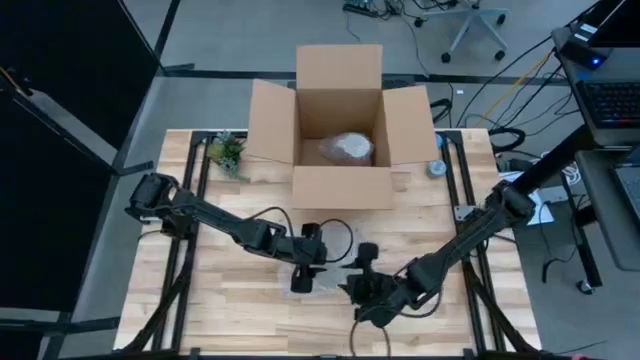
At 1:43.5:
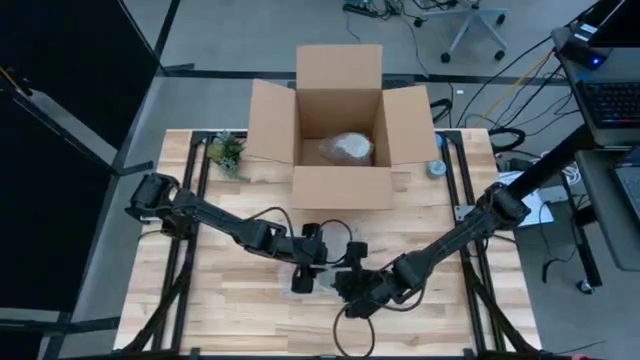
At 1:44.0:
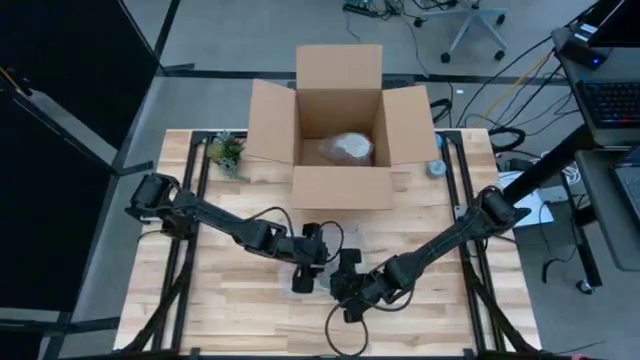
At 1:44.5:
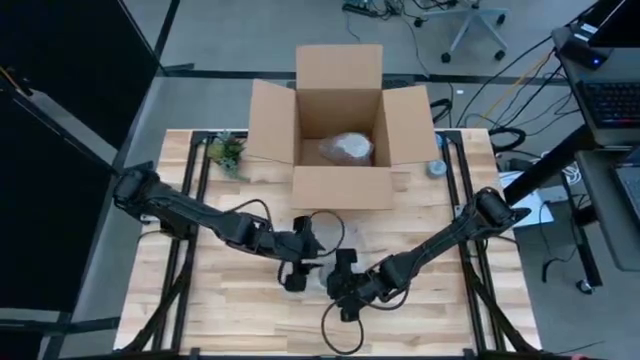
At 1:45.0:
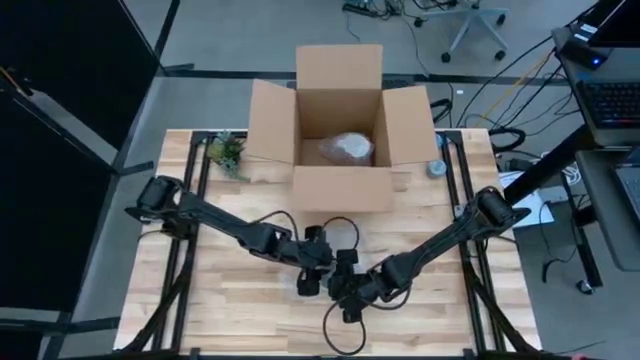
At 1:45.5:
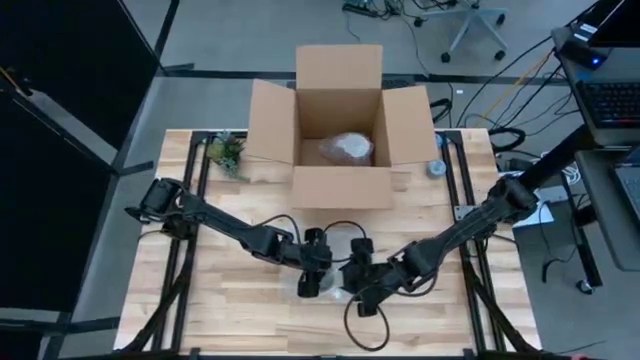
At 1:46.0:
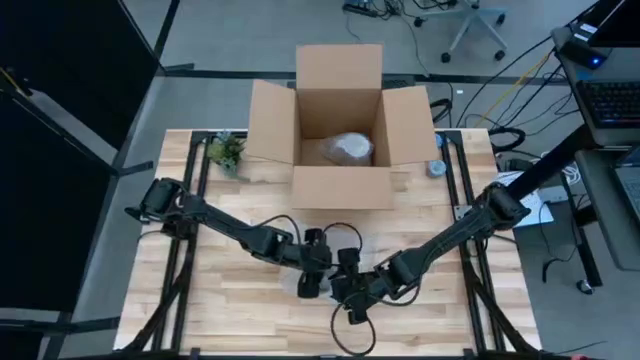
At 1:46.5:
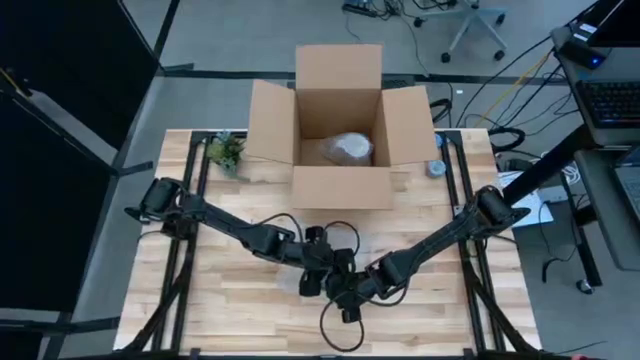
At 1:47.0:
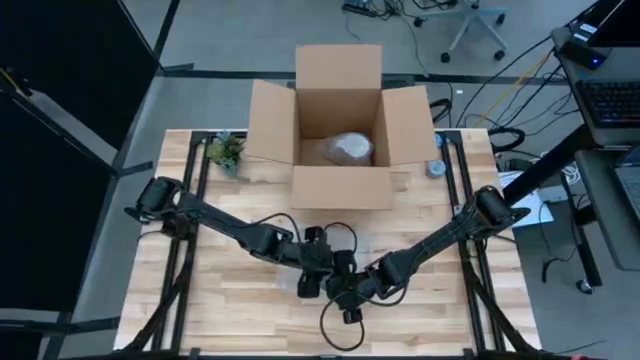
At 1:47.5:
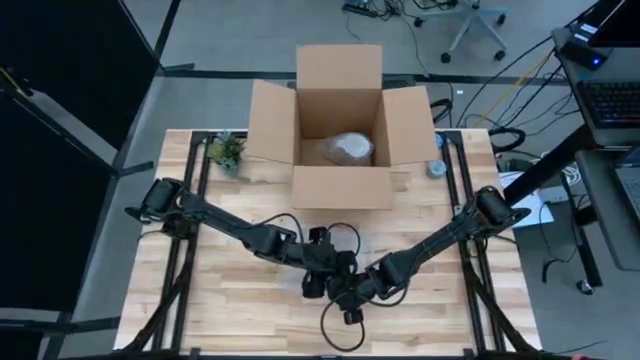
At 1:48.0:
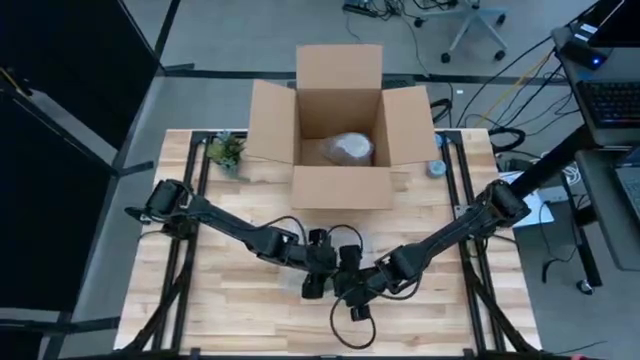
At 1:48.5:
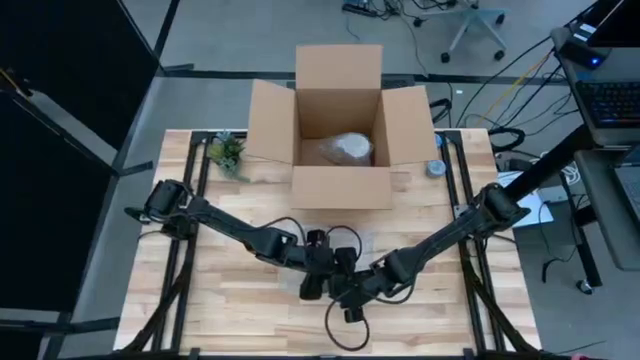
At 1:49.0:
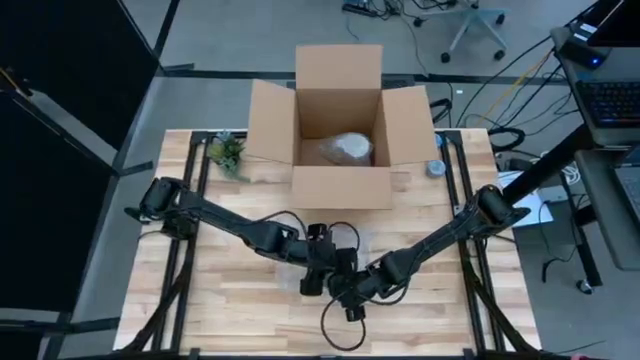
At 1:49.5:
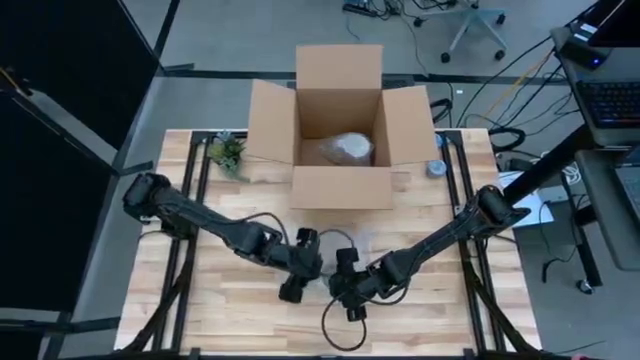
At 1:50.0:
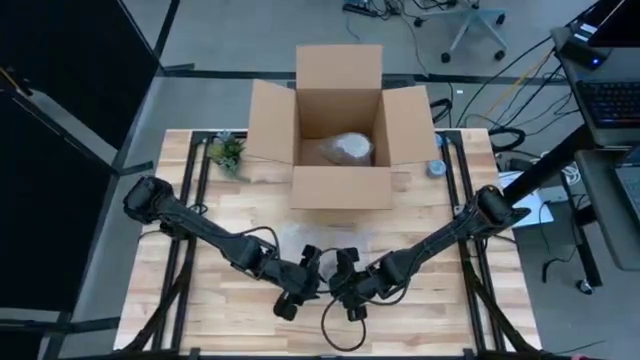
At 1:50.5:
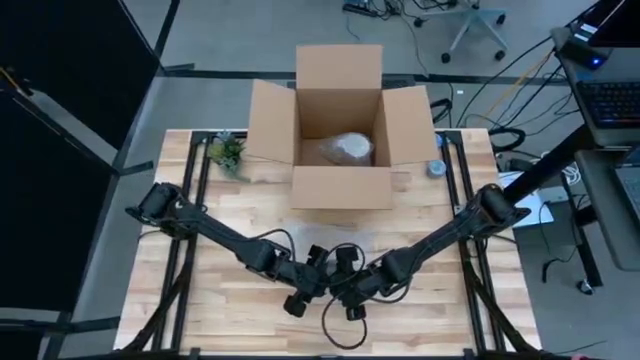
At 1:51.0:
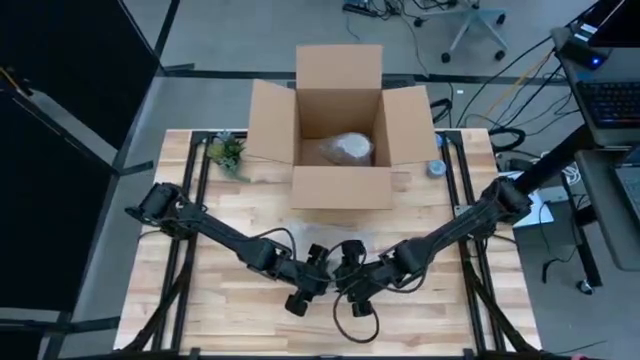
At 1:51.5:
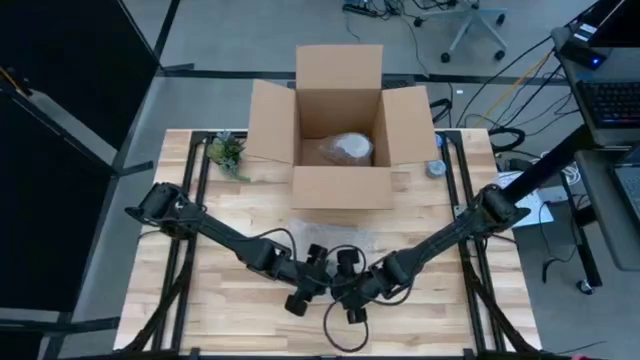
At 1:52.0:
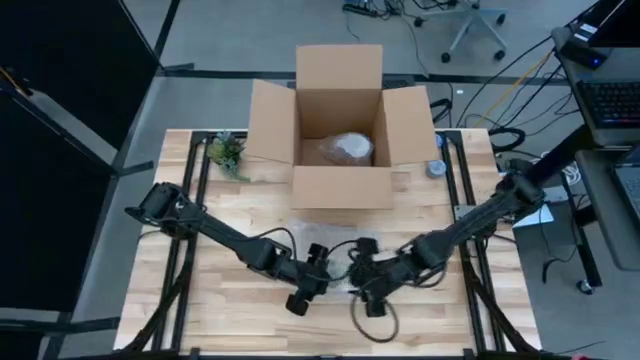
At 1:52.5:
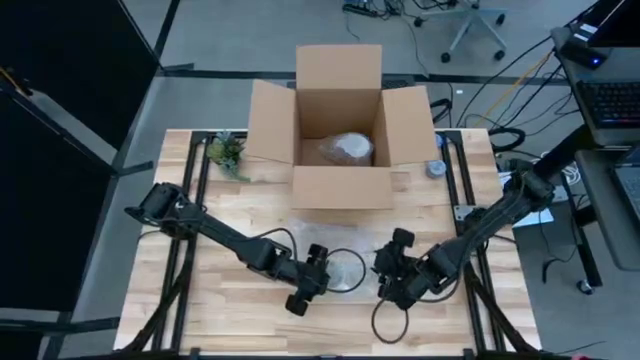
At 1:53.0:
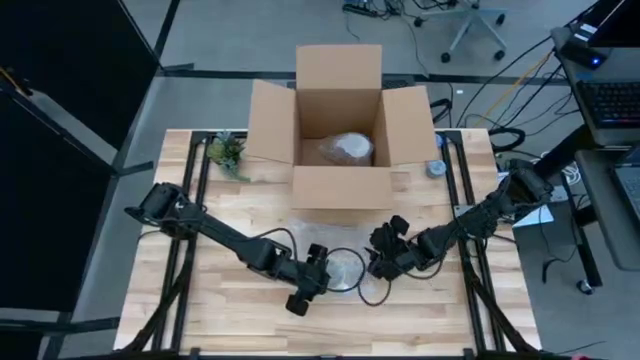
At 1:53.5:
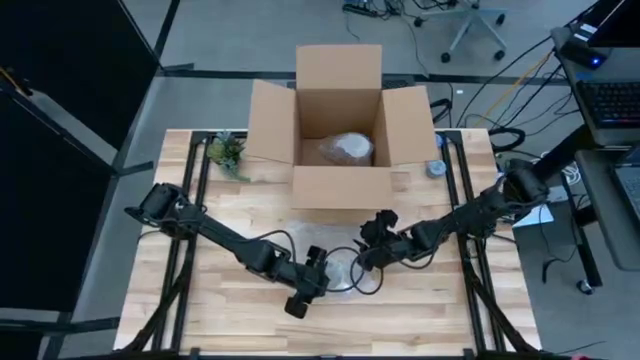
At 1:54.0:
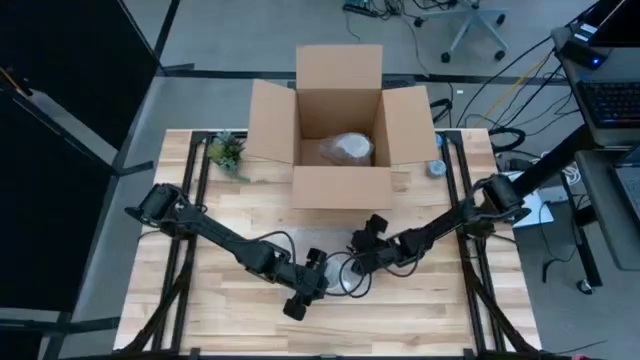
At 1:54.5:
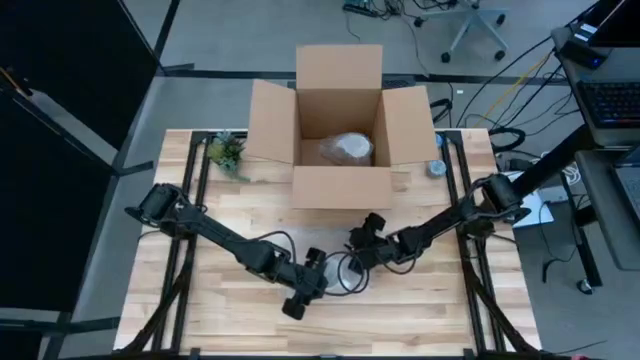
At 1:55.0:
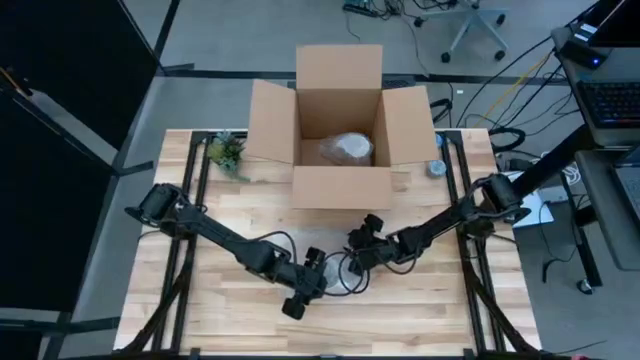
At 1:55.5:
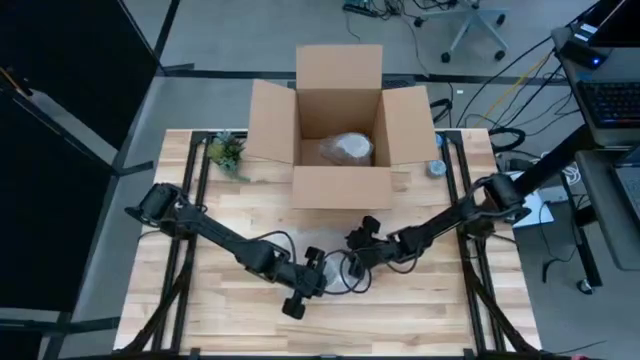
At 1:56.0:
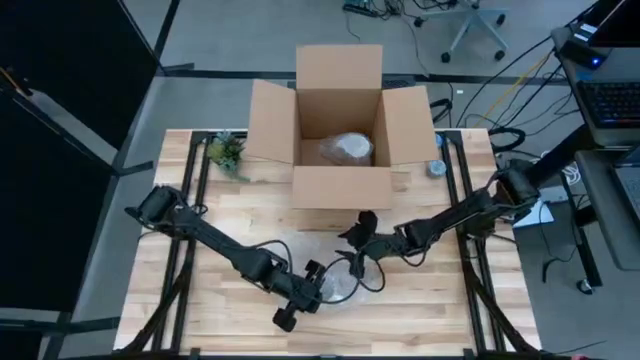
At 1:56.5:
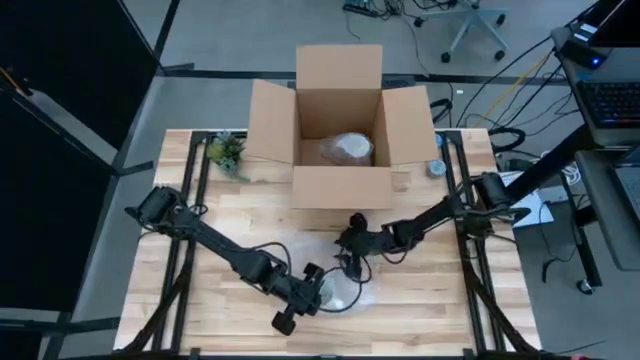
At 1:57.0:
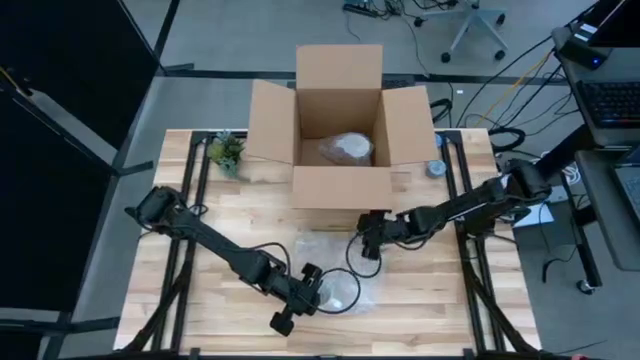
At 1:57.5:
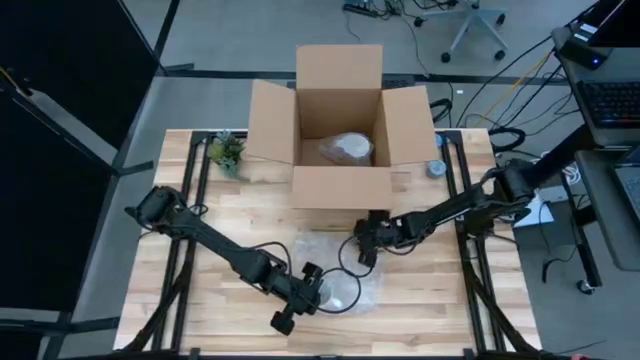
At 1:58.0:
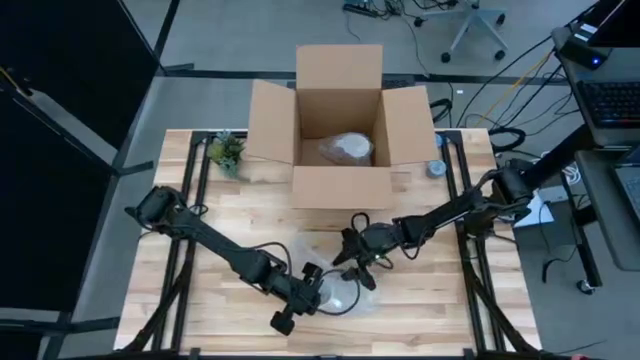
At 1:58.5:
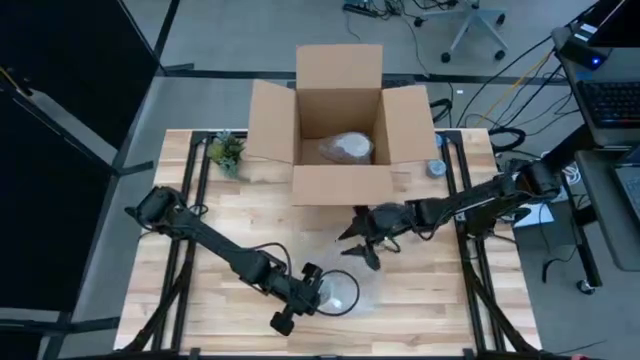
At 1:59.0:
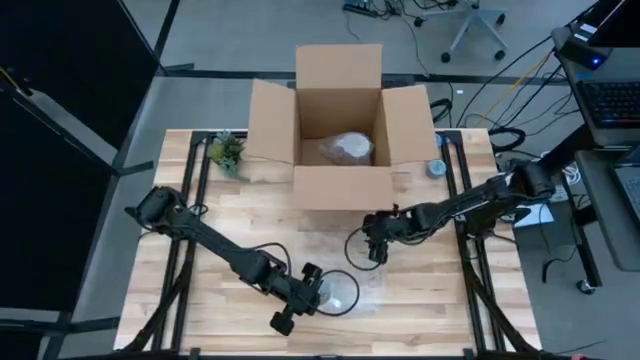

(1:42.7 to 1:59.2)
Task: wrap mug
Wrap the orange mug with bubble wrap

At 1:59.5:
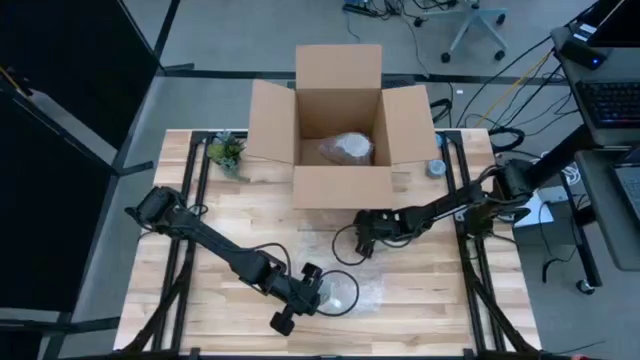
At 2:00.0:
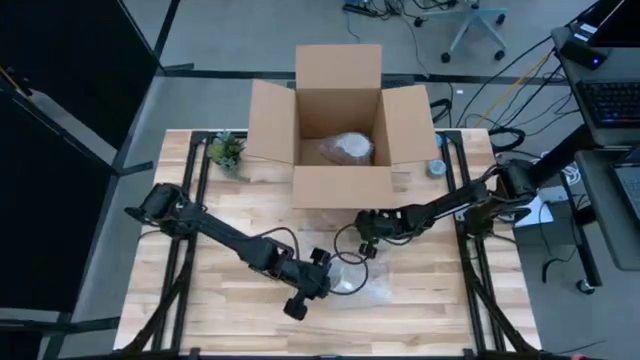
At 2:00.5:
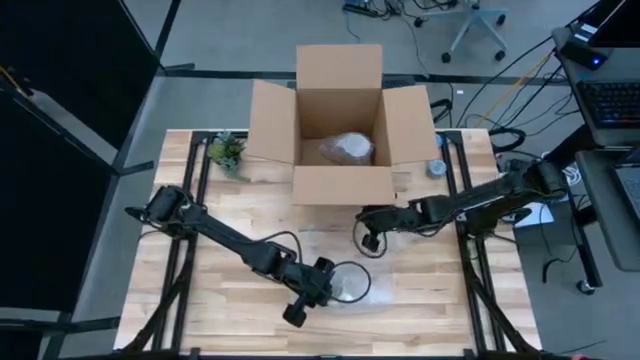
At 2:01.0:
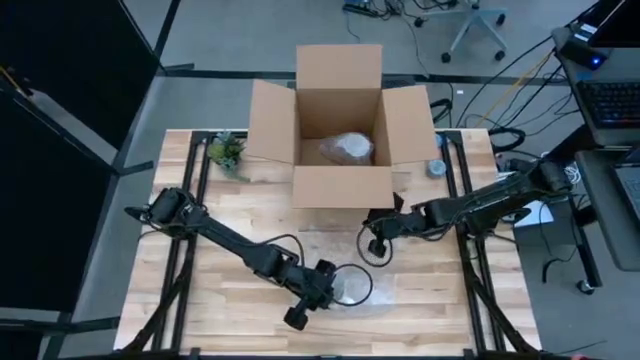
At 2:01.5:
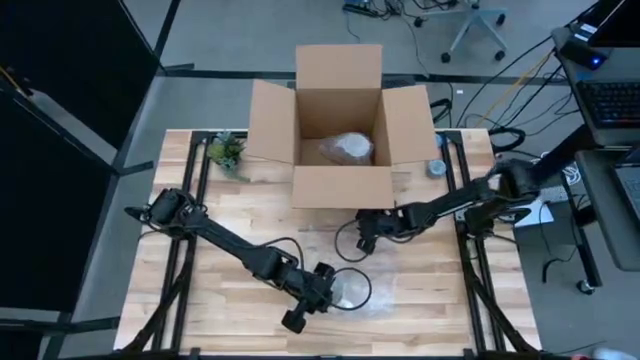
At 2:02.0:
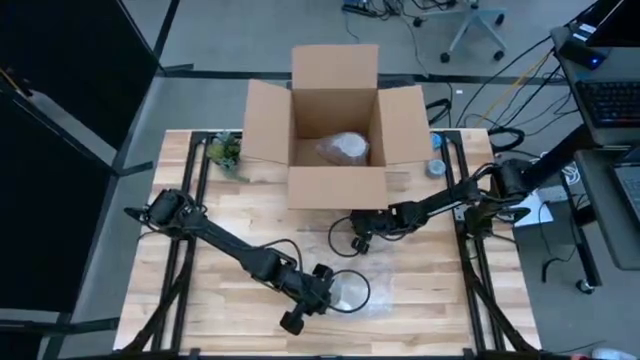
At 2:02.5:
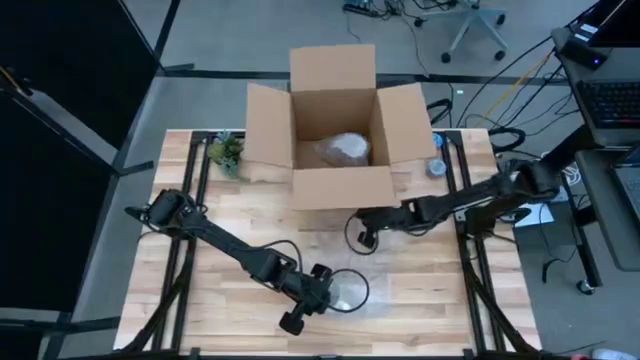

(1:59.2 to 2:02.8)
Wrap the orange mug with bubble wrap

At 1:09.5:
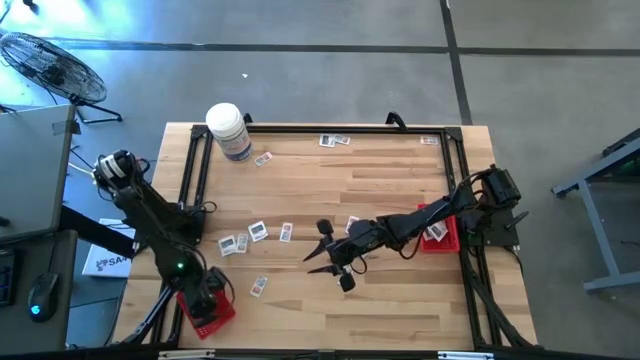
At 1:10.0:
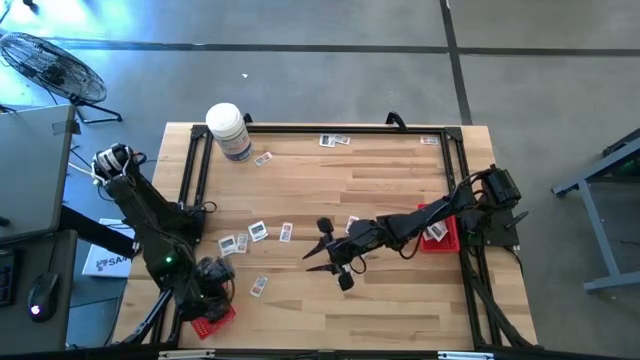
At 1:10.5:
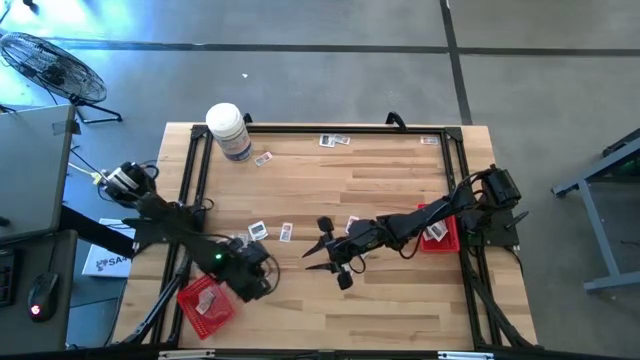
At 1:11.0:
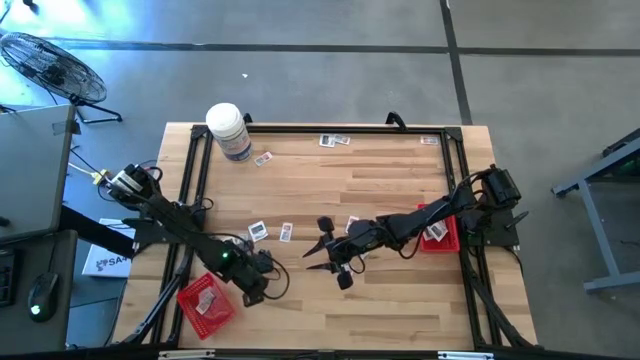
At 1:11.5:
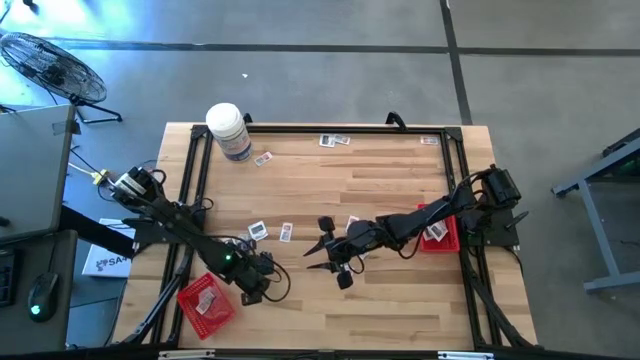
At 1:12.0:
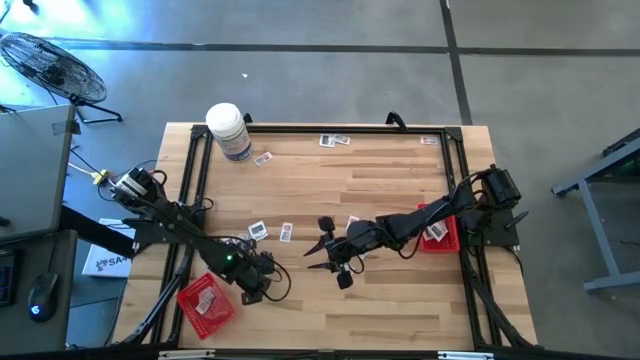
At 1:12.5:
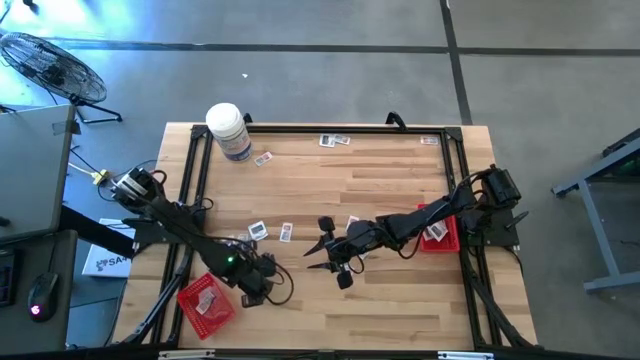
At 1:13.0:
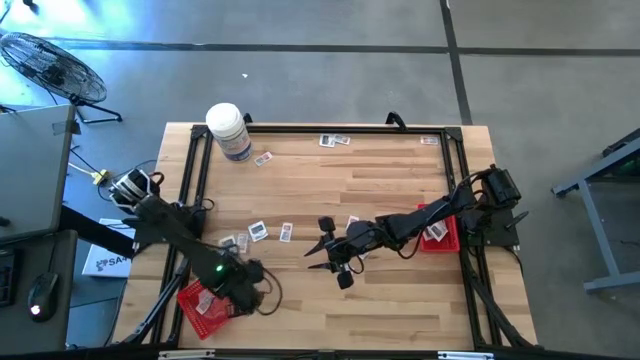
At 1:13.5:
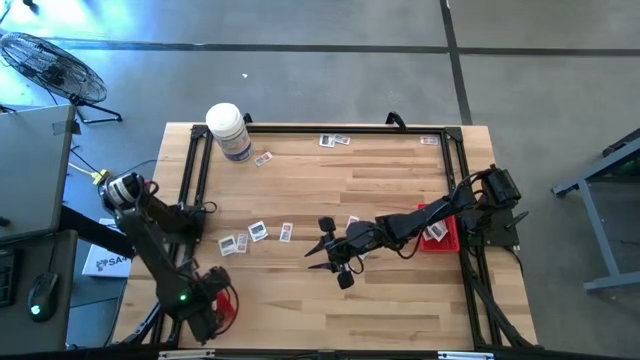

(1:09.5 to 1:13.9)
Task: Pick & Place First Aid Supplies
Put the ointment pack into the left red bin
